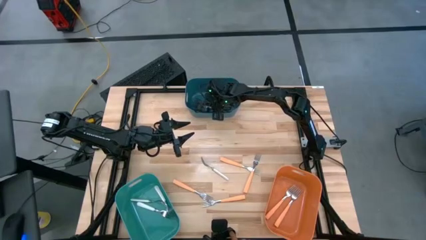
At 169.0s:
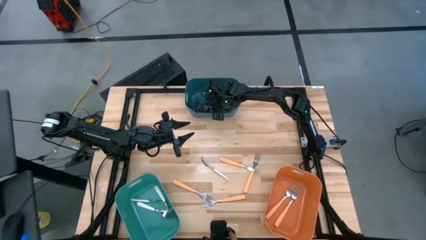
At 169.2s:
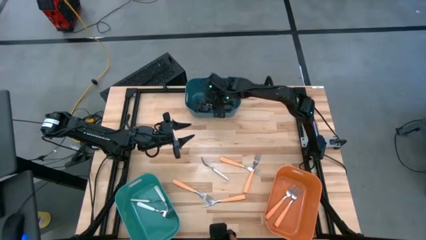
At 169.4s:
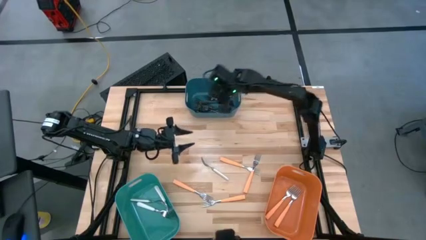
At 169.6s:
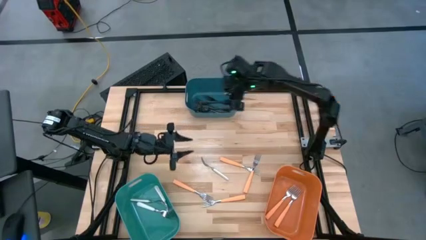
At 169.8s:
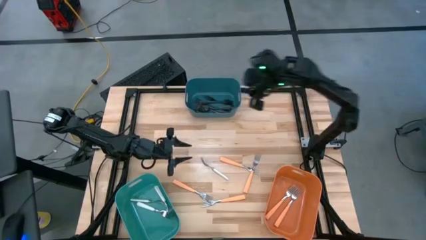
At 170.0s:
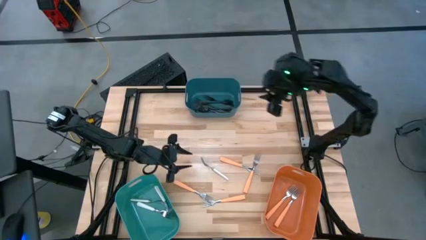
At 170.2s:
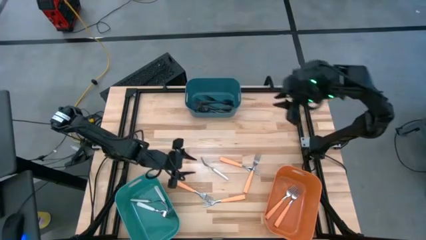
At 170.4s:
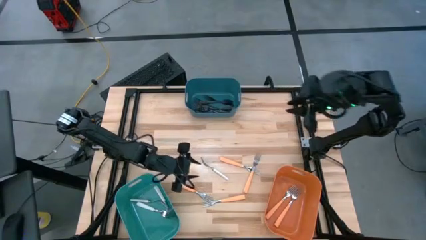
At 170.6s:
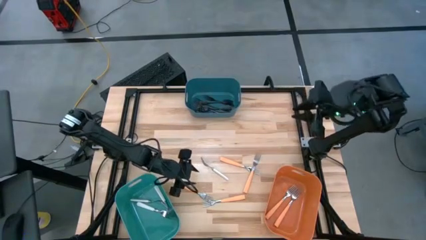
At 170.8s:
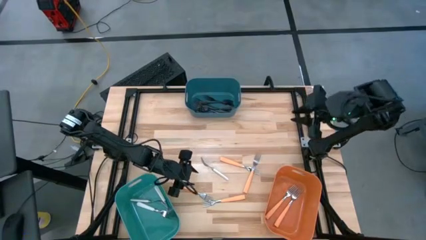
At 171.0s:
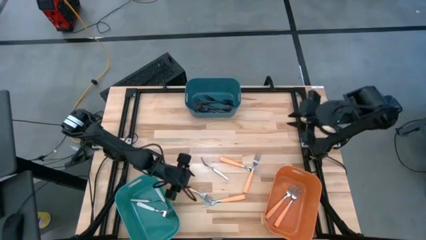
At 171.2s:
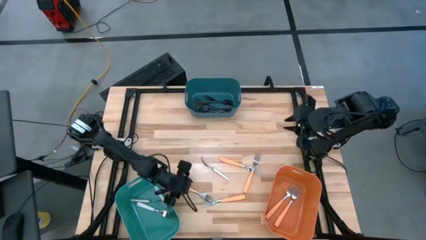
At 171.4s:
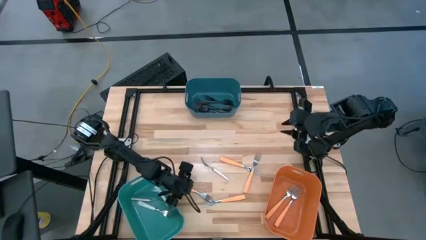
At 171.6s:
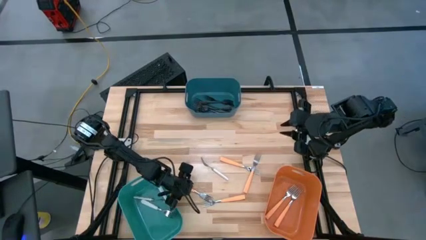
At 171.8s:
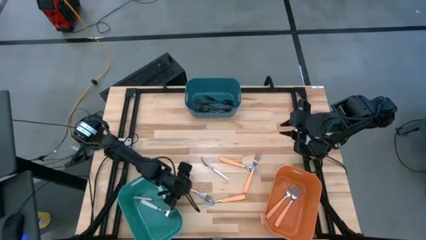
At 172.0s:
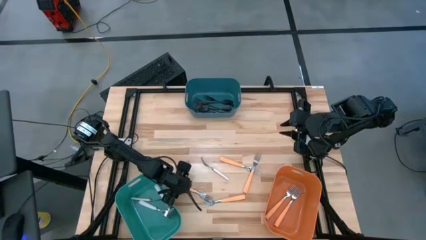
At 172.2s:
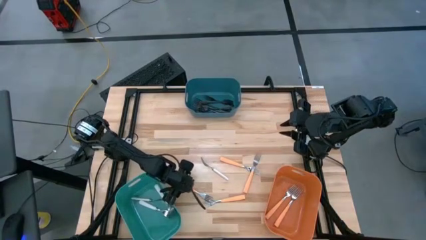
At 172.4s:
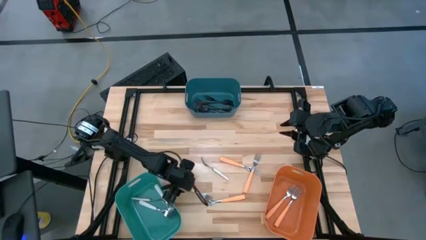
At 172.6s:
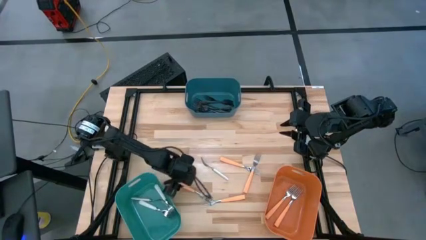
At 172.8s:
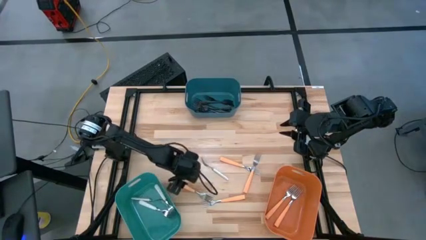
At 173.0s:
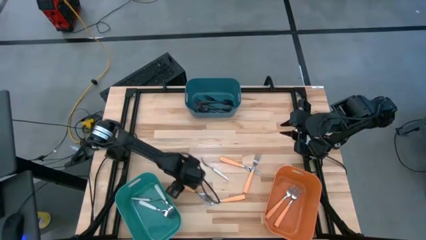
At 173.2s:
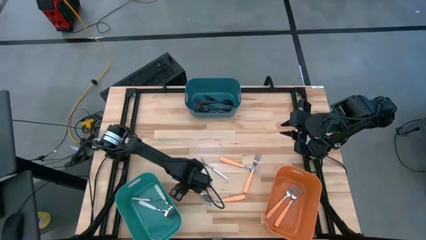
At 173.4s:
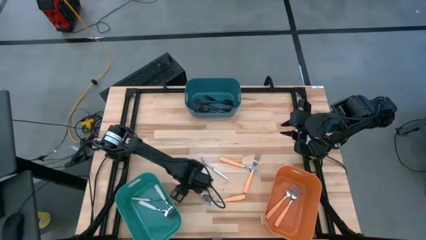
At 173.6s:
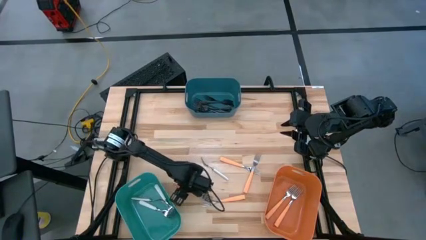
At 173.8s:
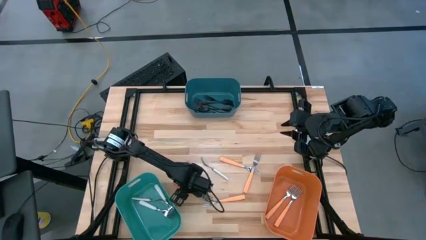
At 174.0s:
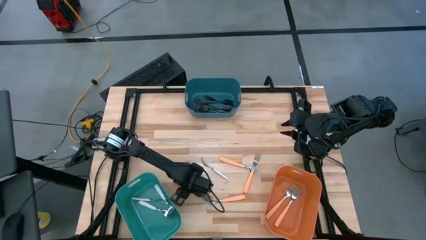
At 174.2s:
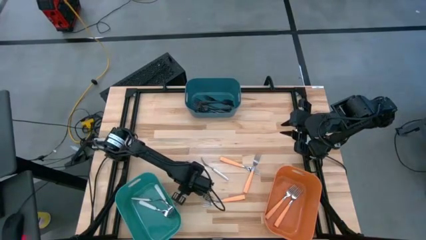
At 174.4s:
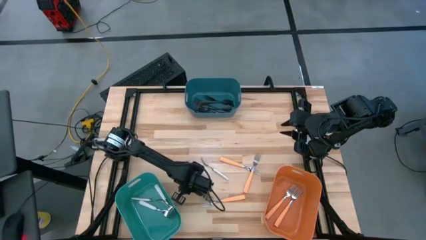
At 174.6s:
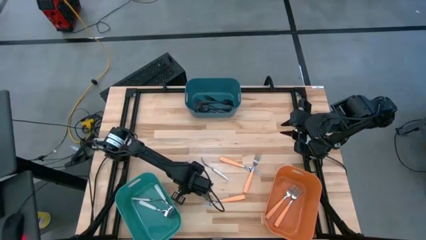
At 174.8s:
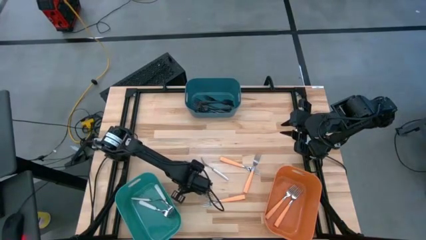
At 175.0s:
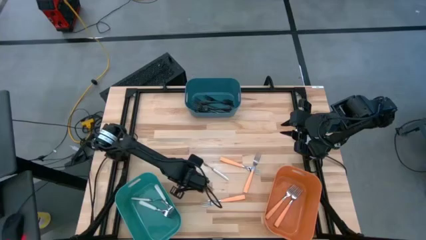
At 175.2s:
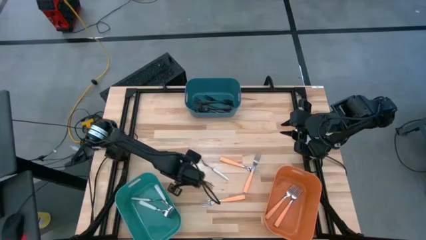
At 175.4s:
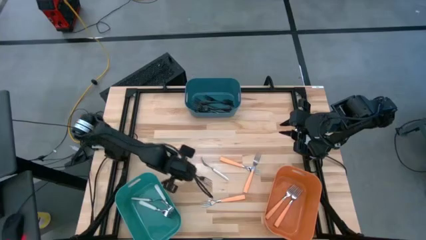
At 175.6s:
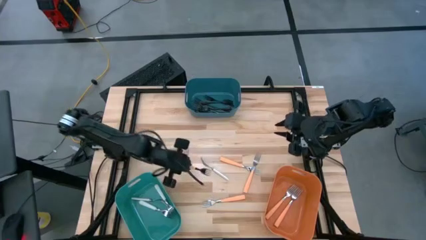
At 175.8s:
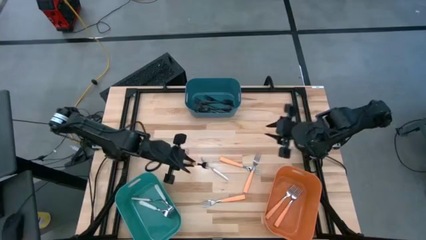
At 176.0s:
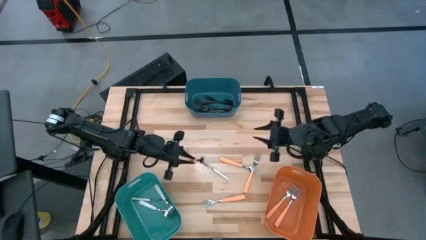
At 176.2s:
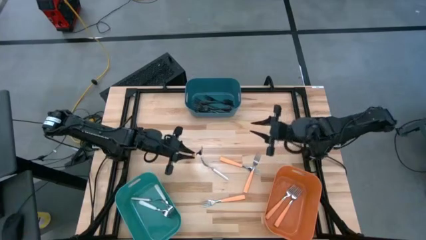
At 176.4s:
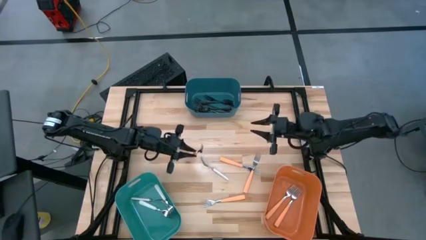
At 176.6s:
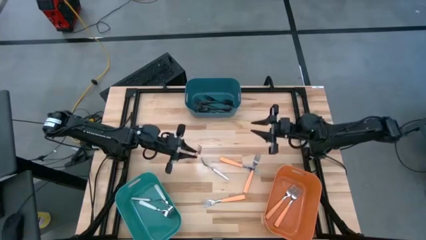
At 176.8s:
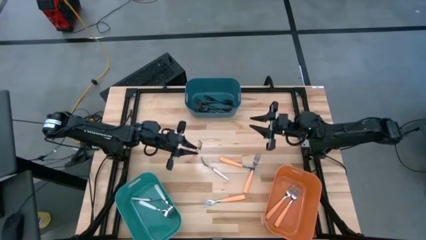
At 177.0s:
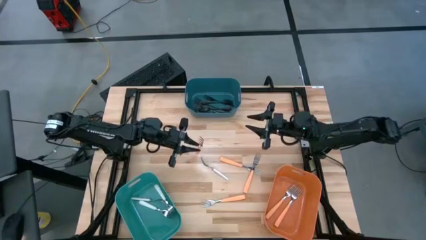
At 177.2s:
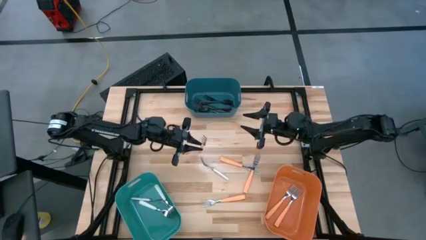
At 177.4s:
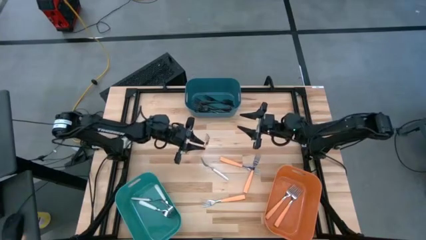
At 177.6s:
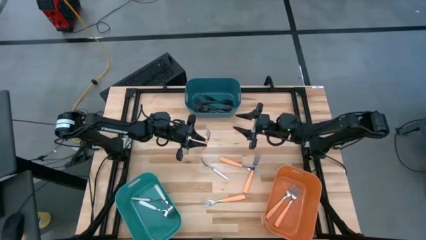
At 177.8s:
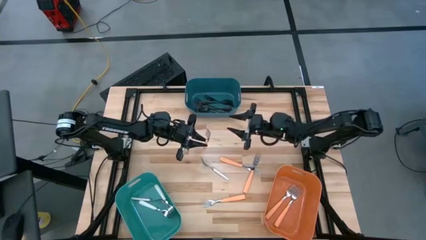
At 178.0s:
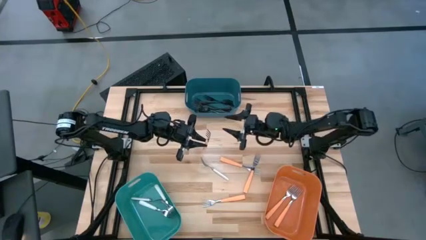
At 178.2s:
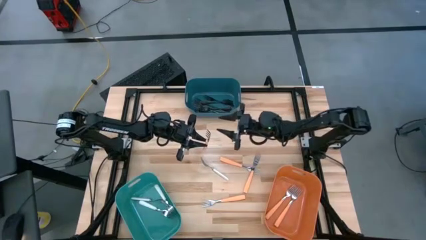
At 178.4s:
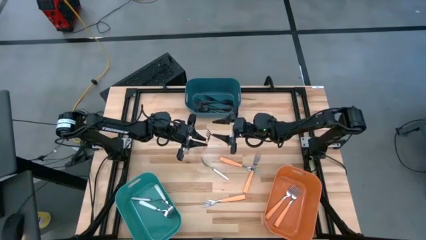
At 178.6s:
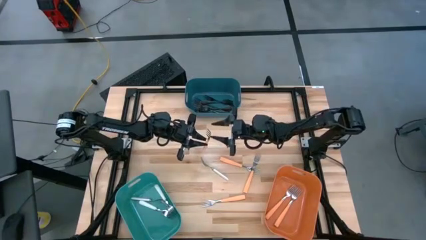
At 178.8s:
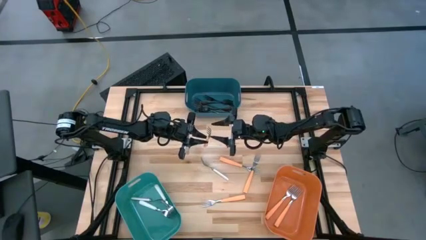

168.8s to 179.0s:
Task: Sort silverware by color (type)
Put the orange fork into the orange bin

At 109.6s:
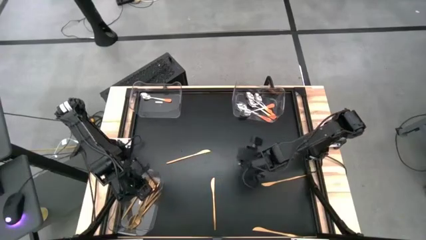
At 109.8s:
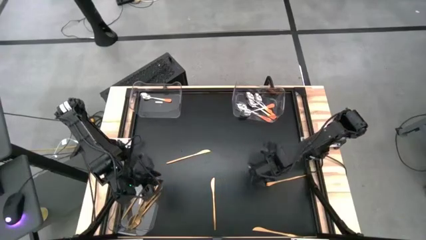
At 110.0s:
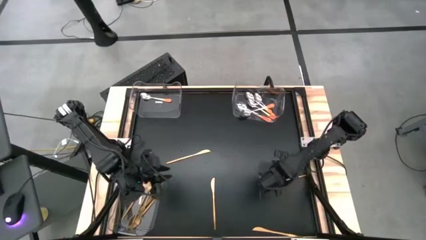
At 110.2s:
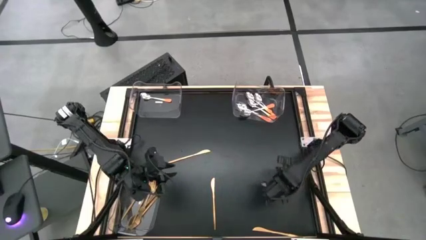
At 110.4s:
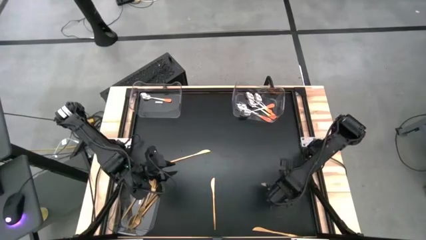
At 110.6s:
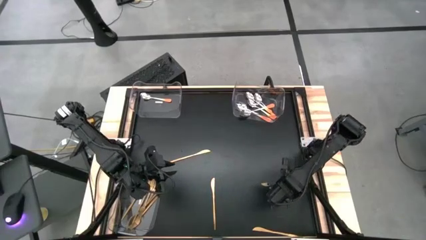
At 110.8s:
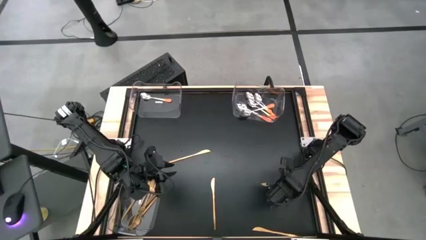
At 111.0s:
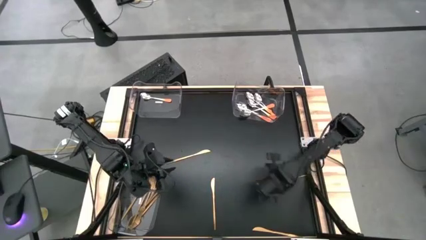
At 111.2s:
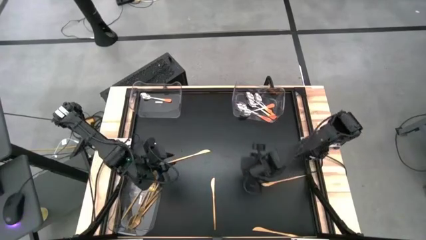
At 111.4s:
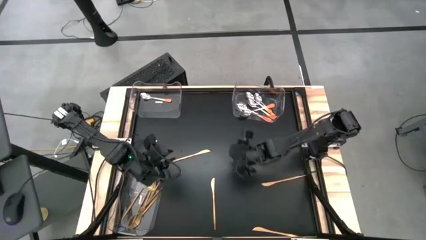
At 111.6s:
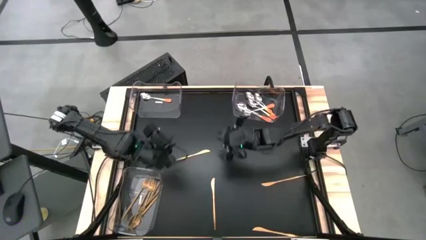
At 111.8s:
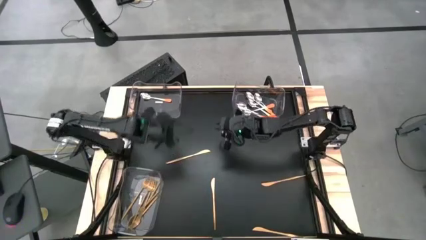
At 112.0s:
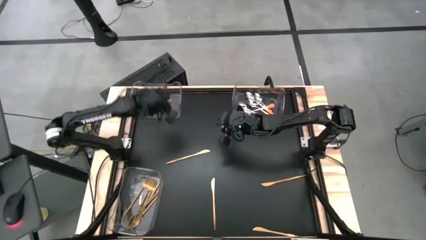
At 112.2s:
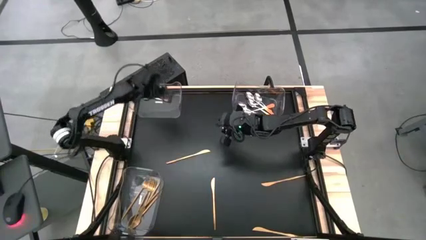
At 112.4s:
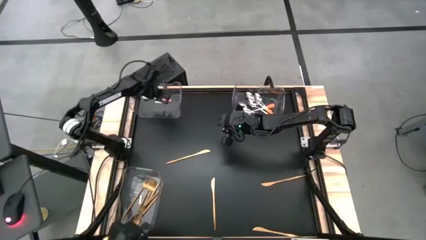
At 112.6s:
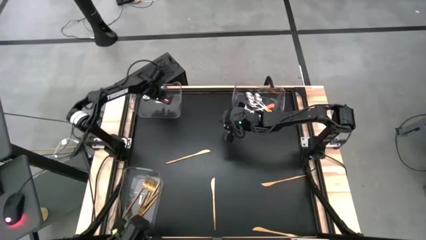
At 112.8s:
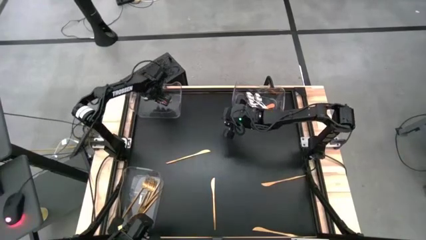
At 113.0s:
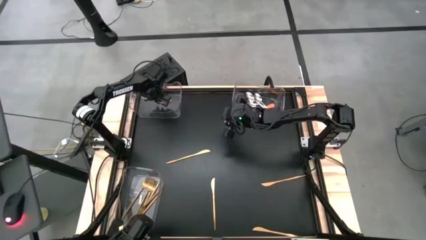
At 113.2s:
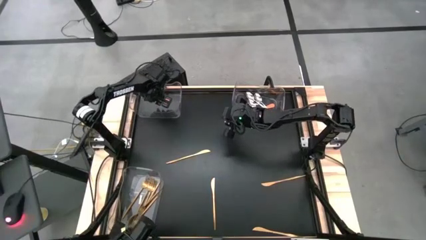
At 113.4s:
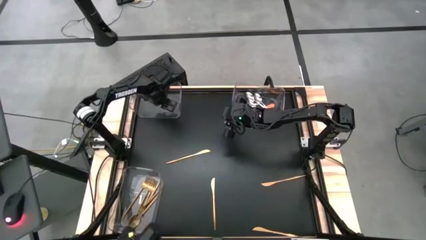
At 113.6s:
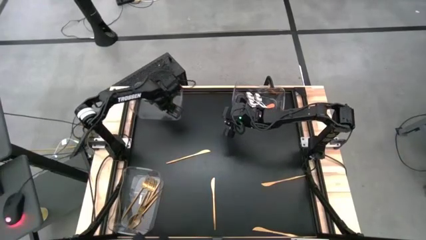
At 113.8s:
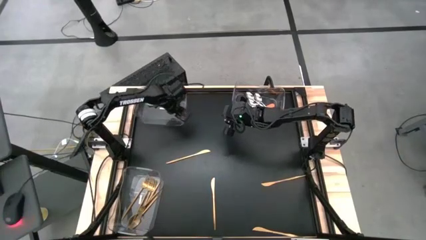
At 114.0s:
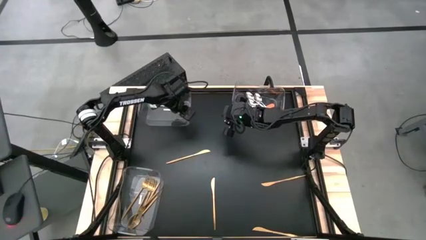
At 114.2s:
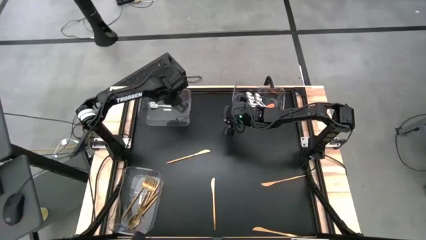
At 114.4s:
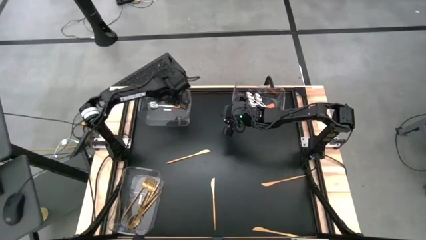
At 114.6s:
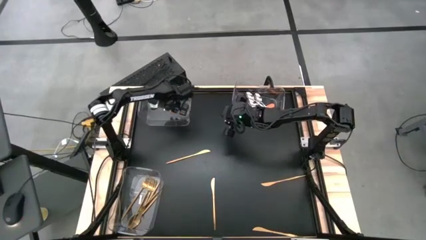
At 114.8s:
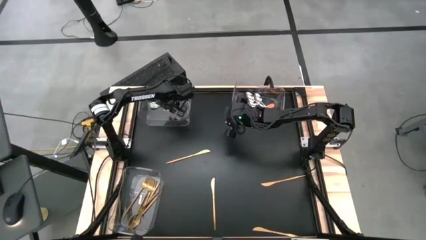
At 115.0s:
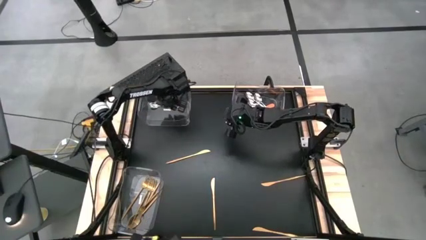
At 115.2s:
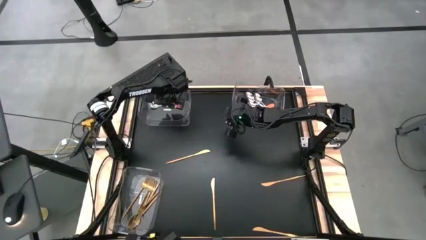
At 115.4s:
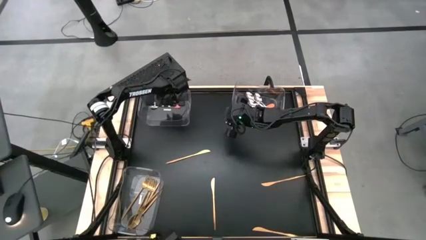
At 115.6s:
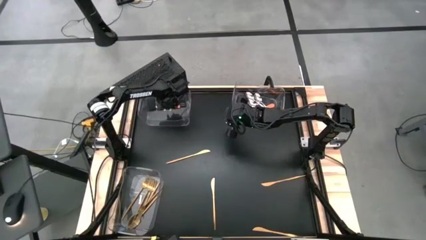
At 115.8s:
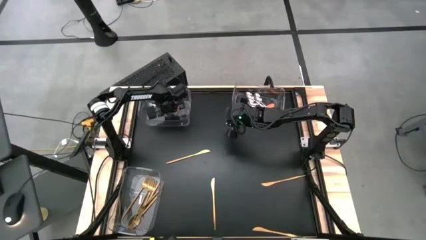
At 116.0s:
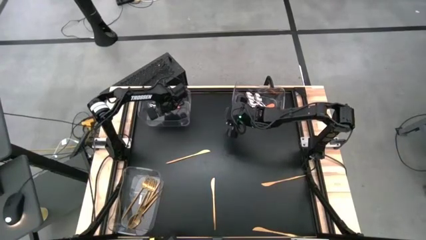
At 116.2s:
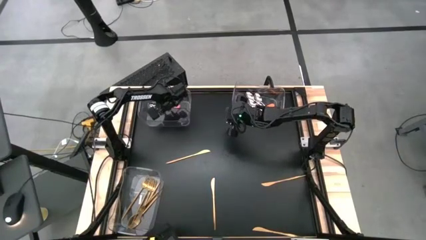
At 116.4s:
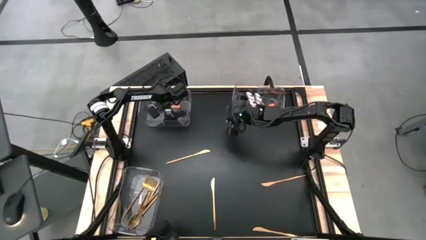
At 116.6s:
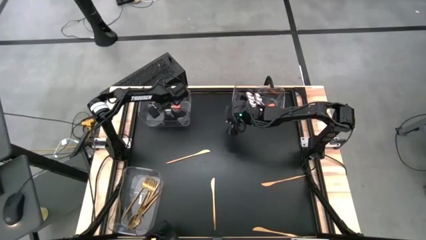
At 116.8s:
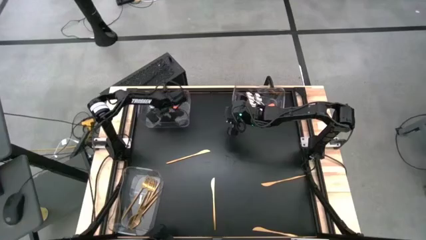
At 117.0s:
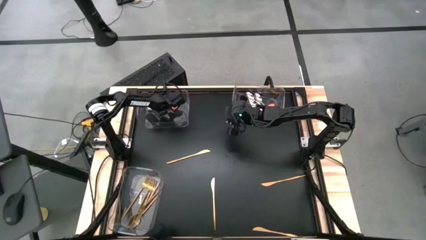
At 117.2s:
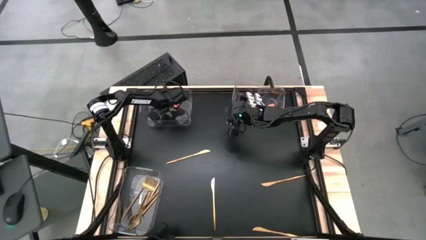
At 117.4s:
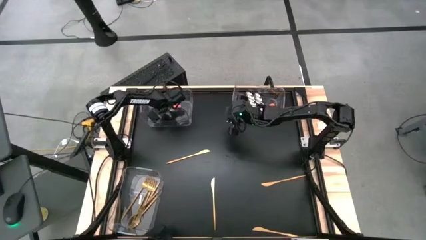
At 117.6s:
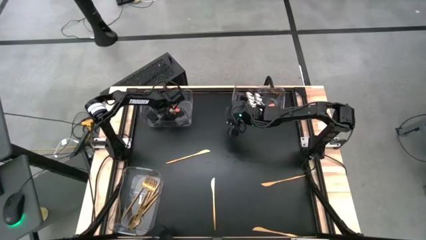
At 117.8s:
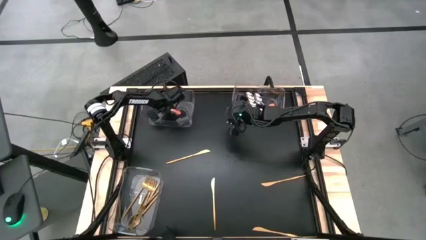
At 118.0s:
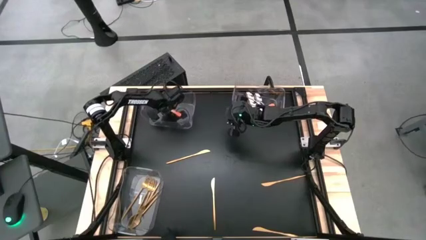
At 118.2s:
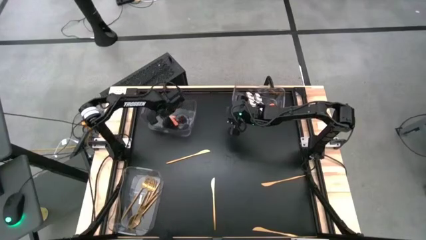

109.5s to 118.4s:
Task: Sort silverware by color (type)
Remove the silver and orange spoon from the top left transparent bin
